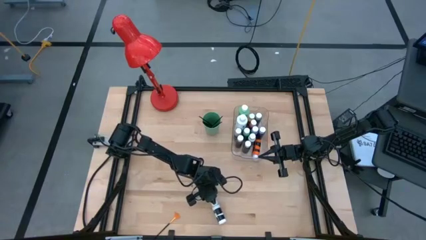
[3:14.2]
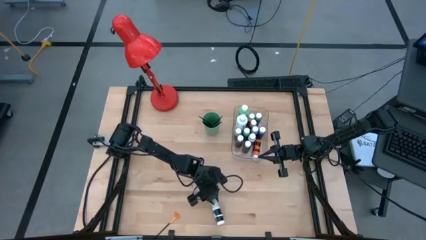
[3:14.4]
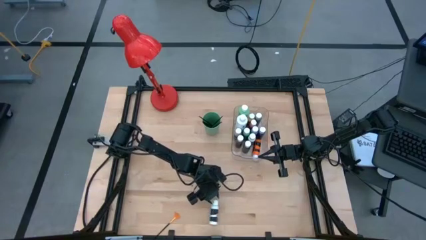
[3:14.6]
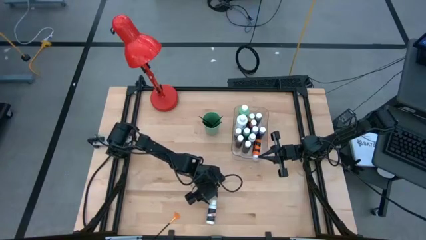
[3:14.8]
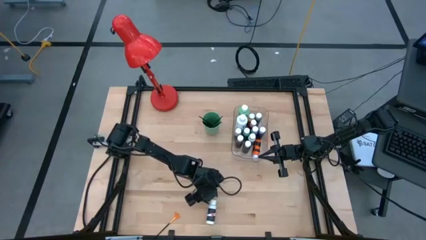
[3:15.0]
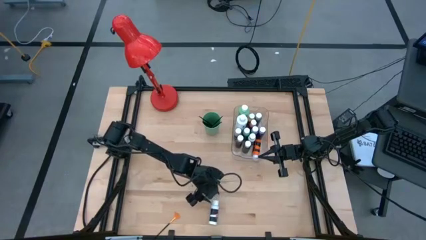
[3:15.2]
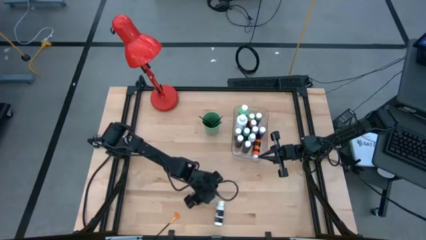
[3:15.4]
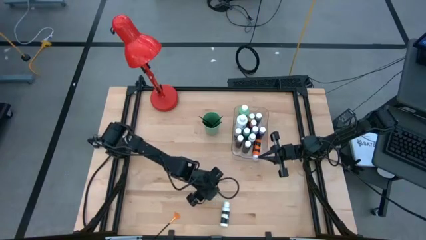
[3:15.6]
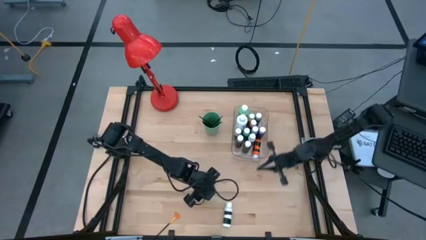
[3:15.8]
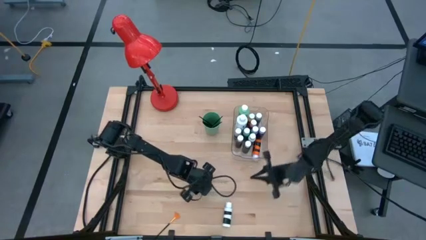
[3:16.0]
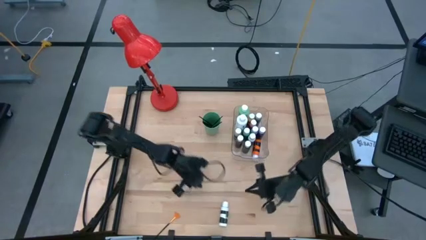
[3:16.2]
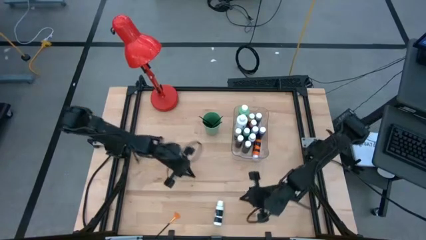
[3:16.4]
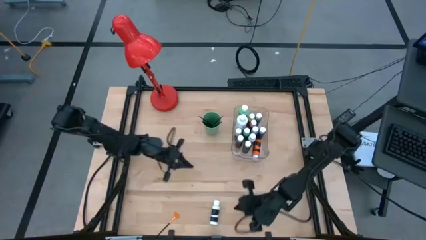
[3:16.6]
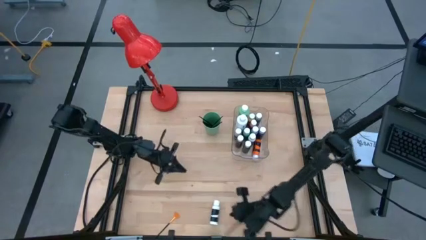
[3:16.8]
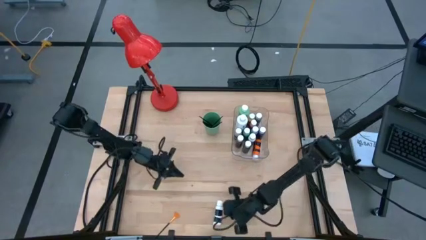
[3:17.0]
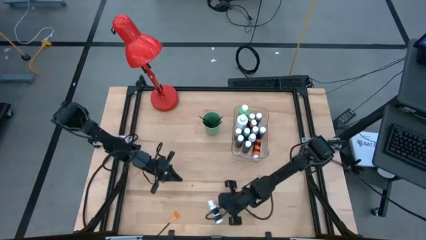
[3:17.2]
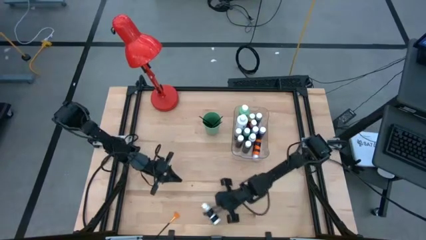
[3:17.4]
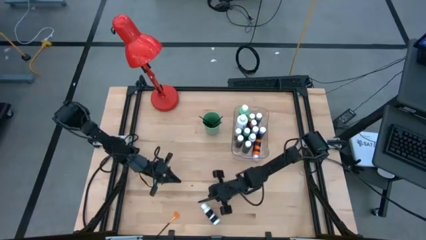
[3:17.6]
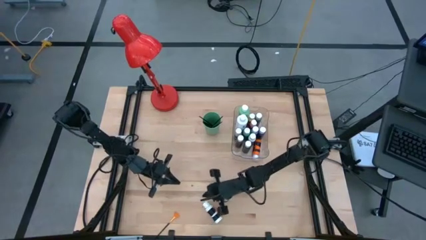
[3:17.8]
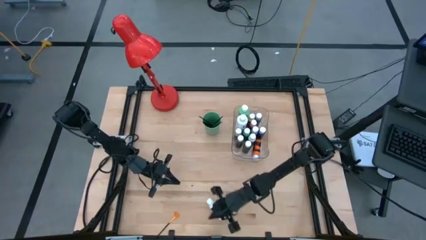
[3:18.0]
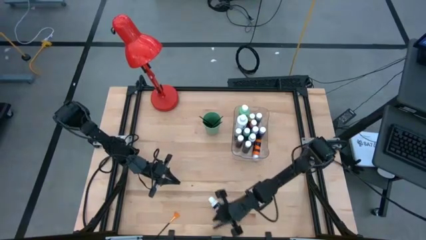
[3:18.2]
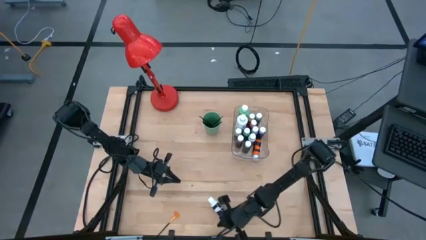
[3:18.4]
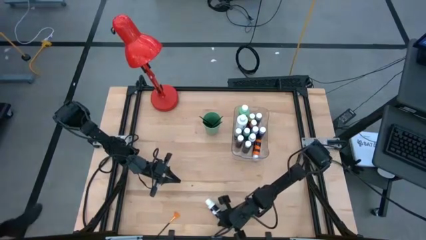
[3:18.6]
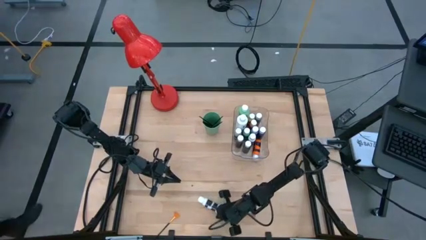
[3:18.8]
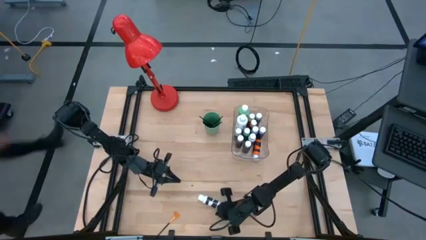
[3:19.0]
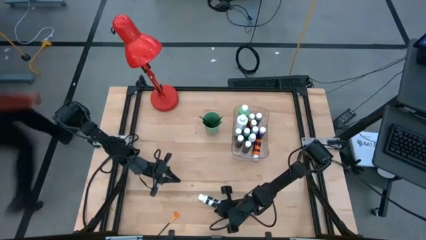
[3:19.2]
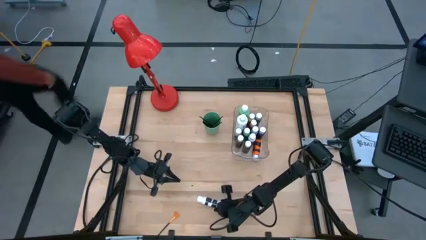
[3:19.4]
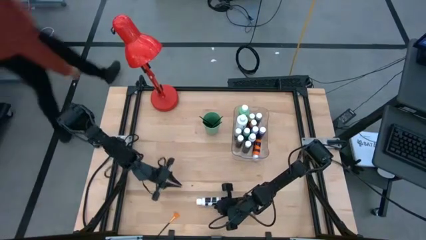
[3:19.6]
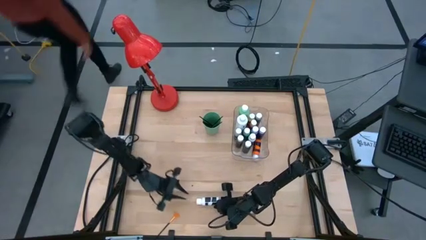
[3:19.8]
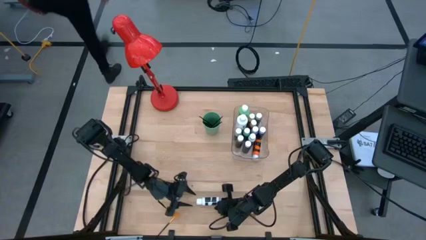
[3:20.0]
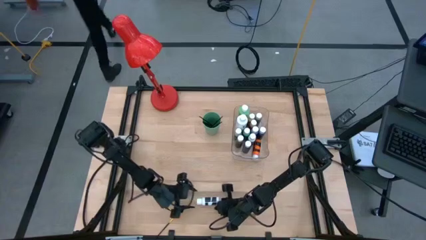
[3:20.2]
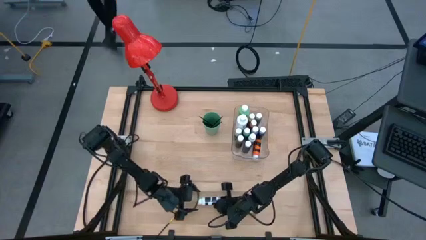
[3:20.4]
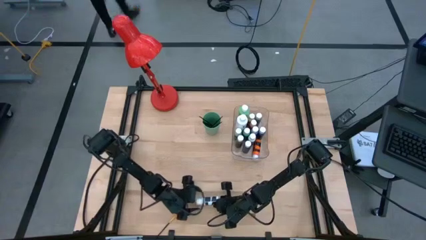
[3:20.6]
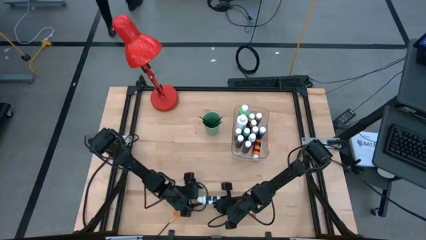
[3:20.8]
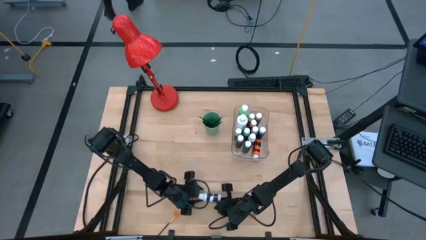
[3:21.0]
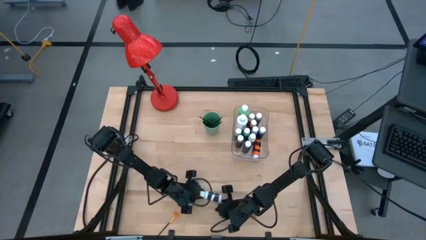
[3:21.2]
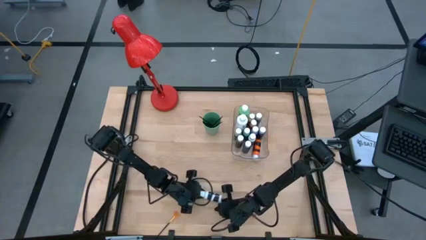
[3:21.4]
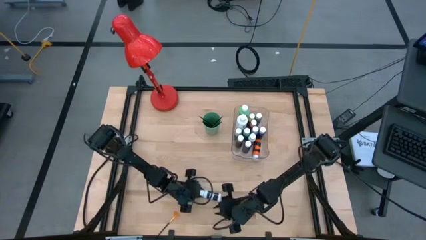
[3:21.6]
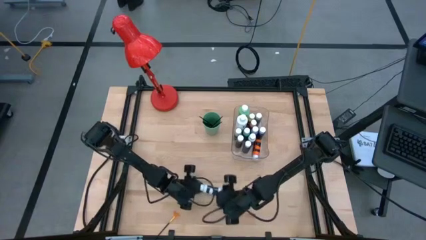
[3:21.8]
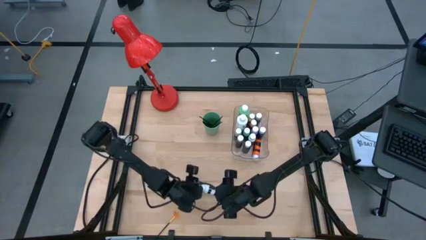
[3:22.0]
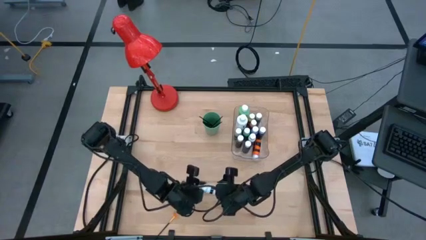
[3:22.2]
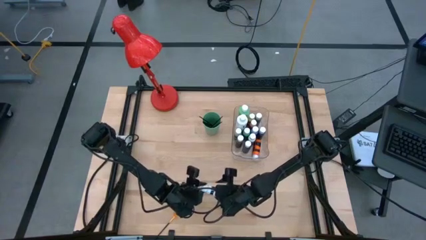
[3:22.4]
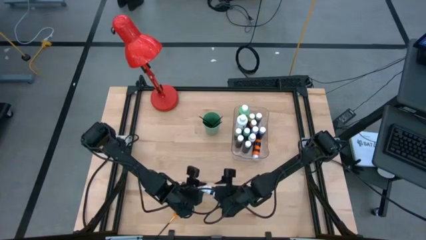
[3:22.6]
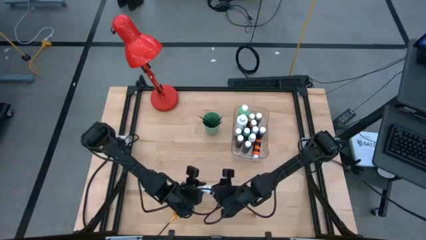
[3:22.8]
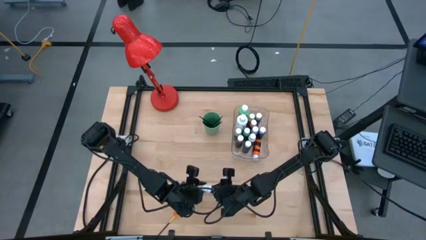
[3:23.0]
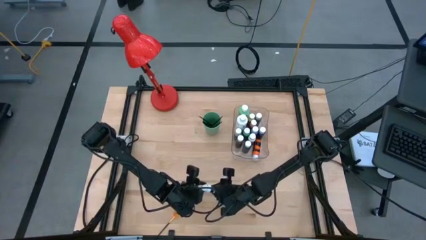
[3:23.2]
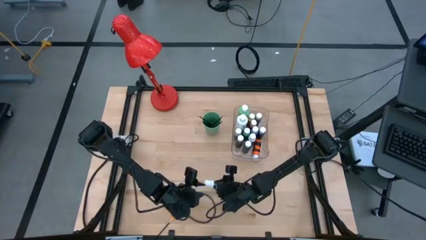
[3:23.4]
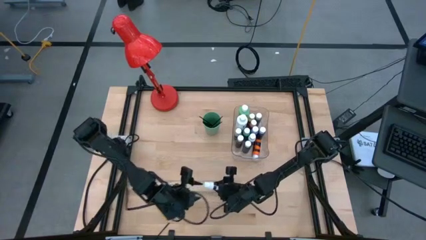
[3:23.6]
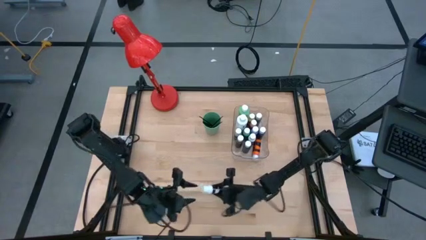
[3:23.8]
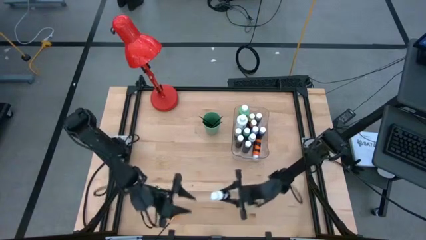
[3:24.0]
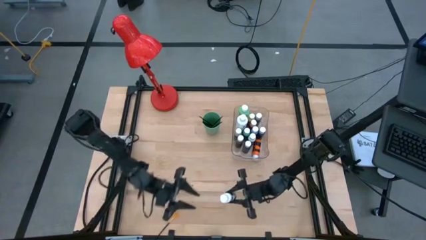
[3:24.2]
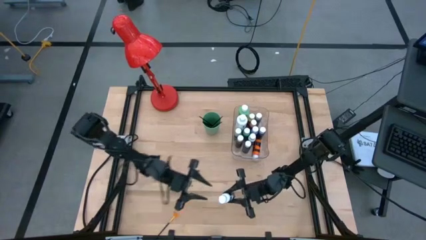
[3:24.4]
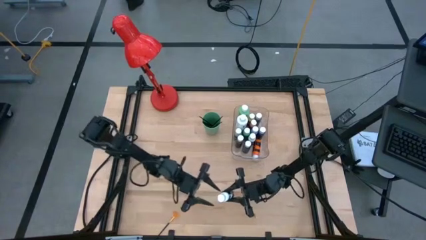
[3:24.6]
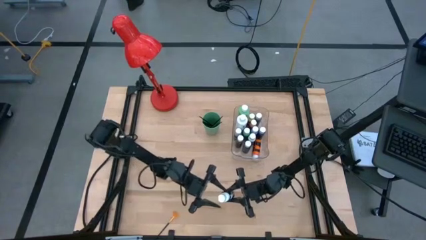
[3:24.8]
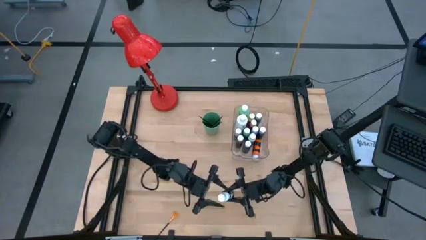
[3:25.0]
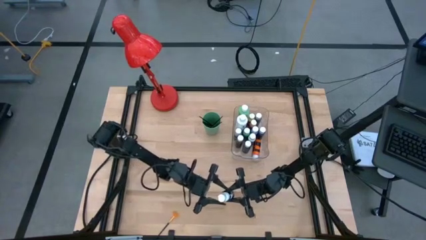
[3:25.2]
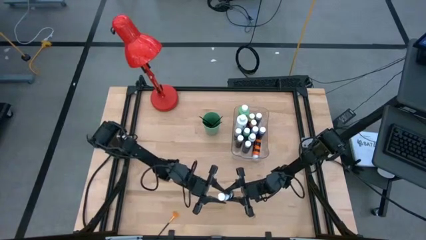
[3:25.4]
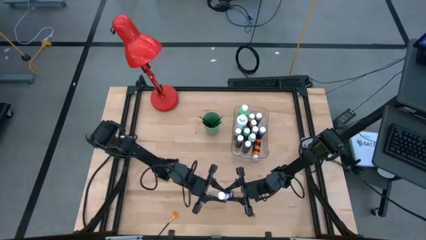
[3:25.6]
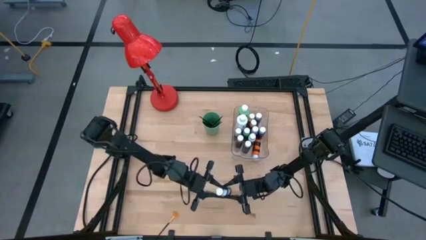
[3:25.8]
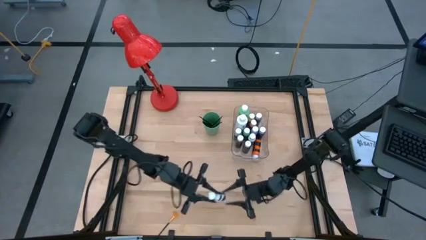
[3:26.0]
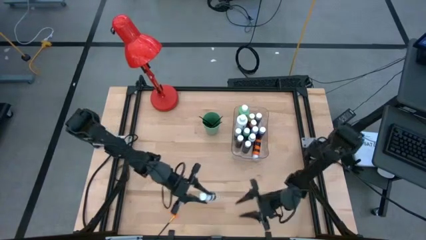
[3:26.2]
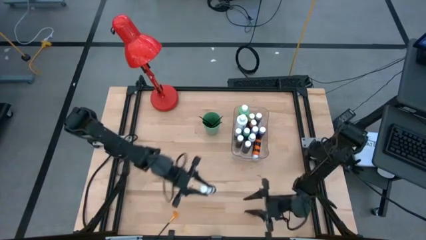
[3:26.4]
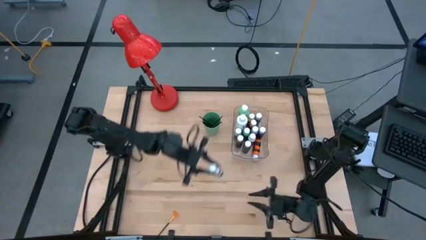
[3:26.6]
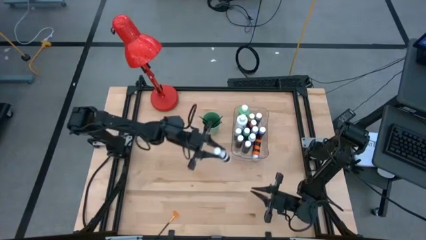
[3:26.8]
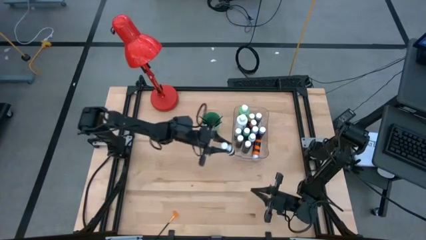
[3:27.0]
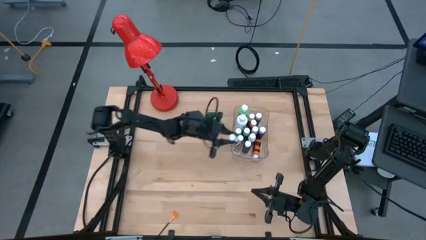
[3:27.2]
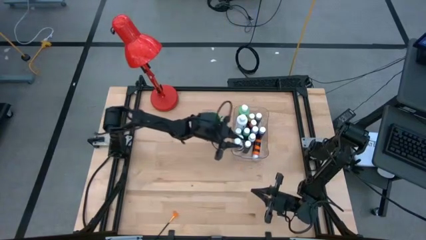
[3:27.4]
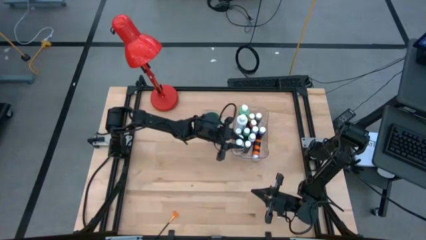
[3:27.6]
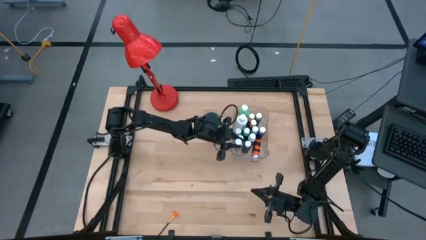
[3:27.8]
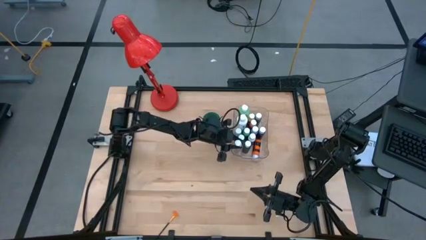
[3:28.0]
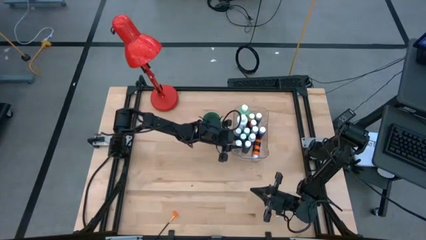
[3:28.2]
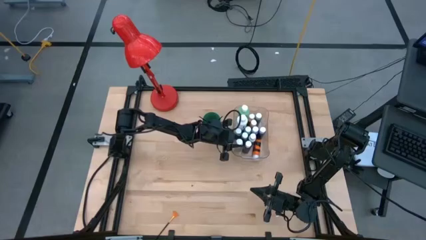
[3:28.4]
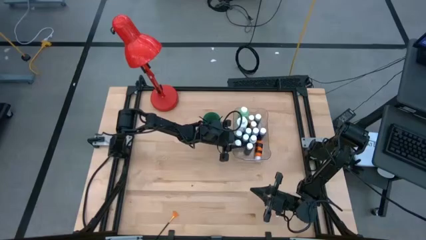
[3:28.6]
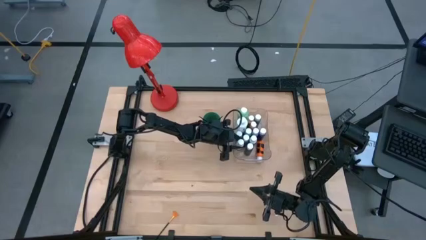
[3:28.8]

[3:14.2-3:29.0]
Task: Pick & Place Paint Supplies
Put the white paint bottle into the transparent bin
